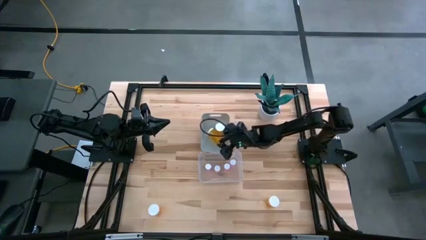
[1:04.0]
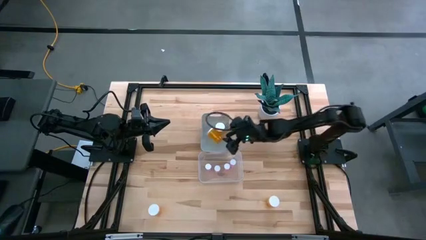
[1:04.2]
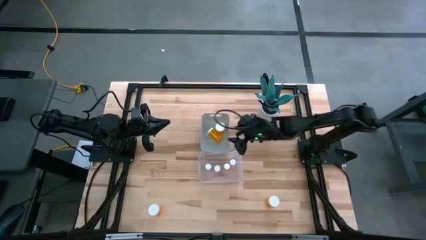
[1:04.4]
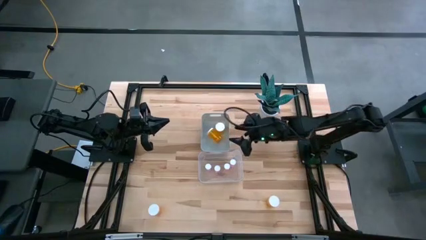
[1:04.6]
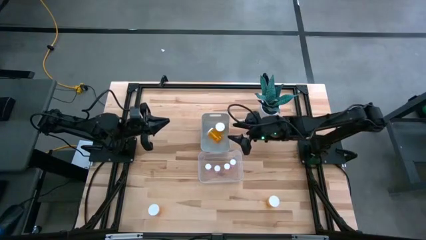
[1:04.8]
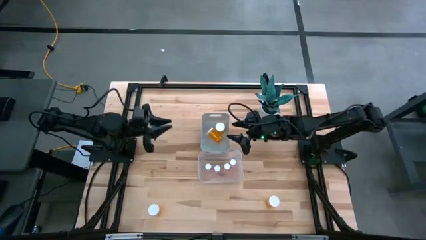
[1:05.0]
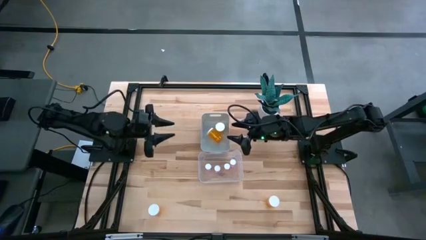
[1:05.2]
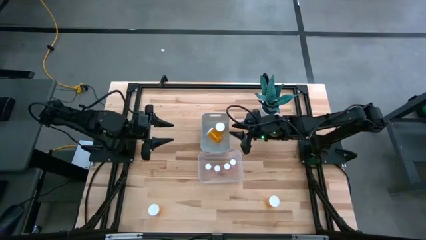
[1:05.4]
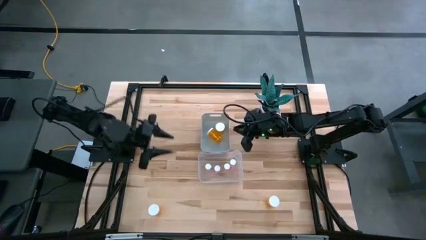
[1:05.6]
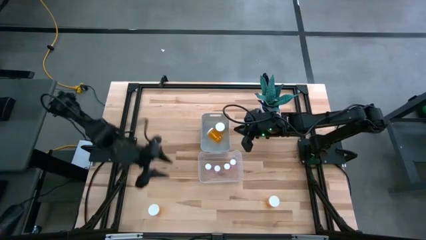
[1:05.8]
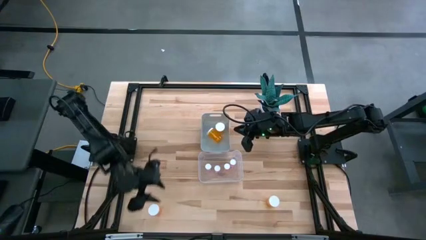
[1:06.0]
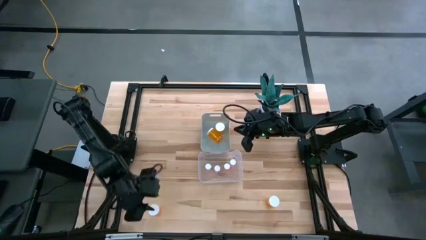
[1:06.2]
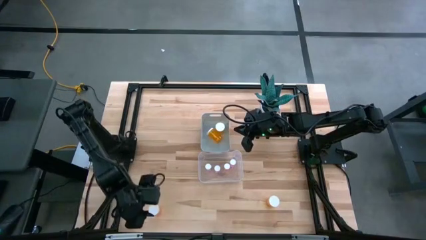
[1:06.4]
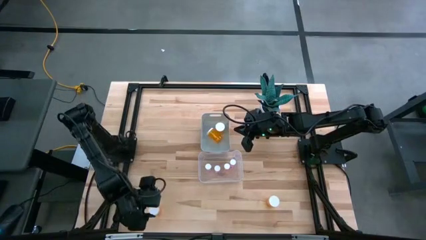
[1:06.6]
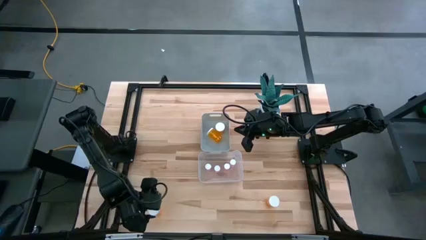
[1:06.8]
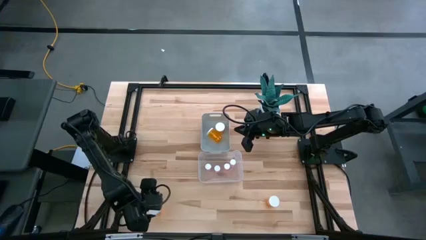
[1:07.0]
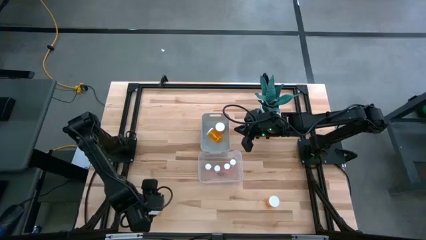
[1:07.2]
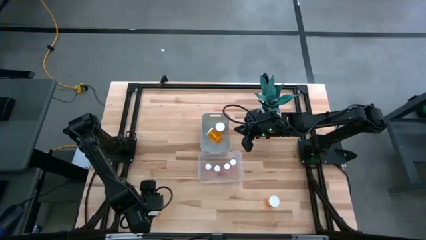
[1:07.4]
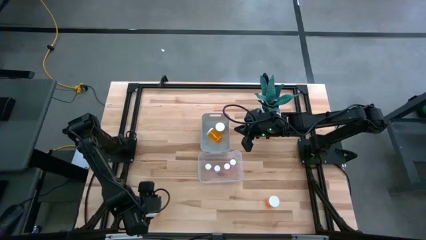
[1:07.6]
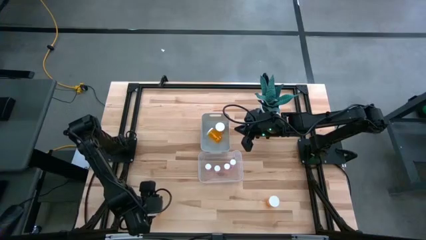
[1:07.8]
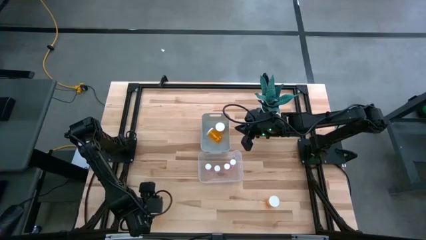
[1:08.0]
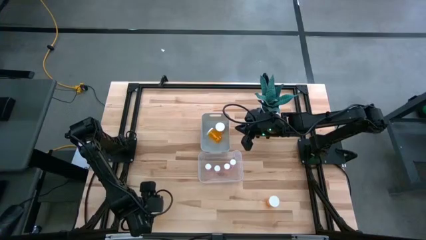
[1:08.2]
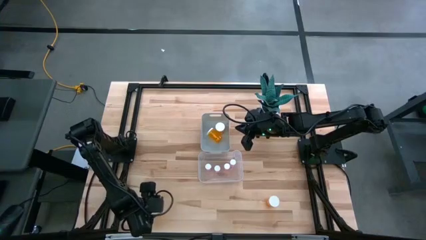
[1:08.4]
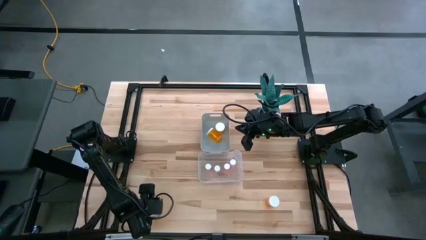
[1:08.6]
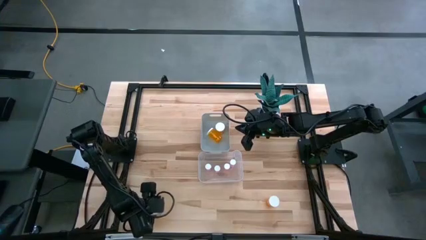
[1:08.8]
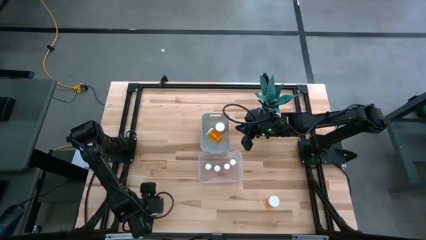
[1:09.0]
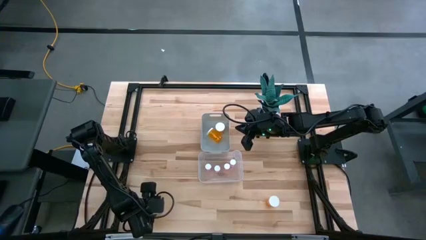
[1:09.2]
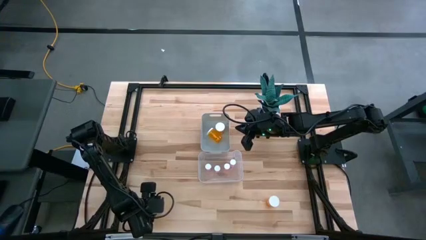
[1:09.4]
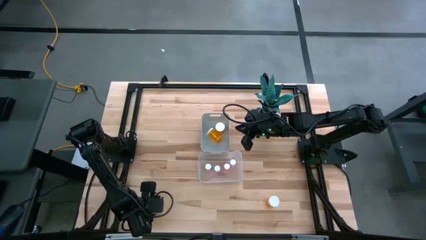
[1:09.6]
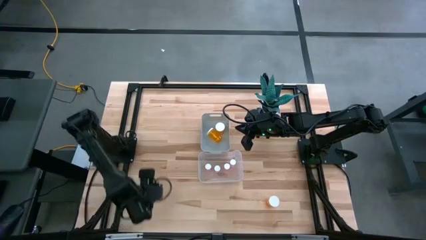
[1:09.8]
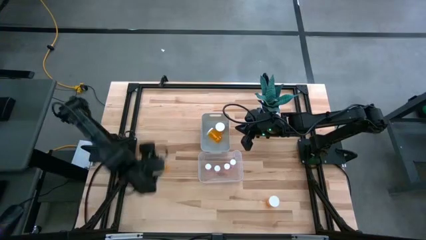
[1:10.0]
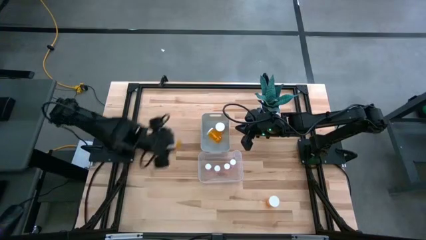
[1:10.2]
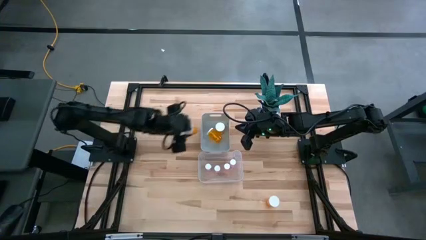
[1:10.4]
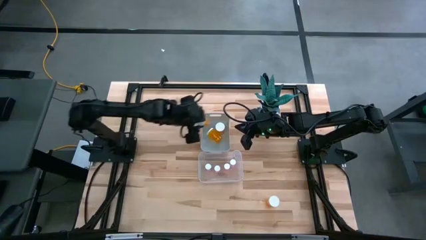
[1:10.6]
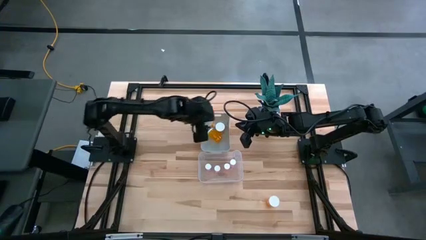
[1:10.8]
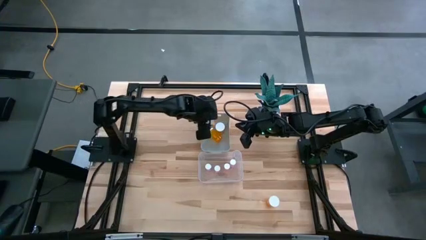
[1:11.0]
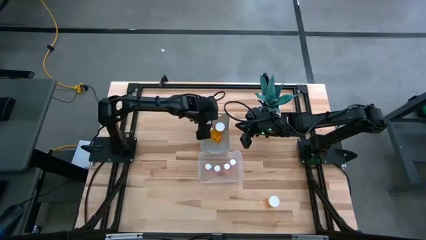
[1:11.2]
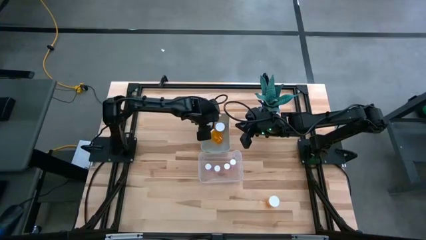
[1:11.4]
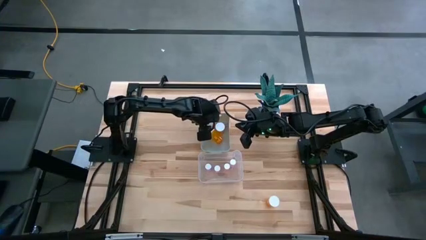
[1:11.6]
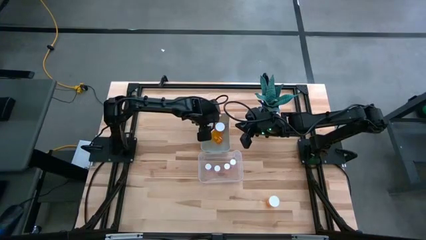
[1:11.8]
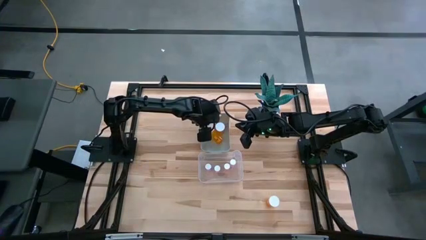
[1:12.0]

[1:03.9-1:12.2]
Task: Pick and place medicine bottles into bin by pill shape (circle, oval)
Put the left orange pill bottle into the gray bin

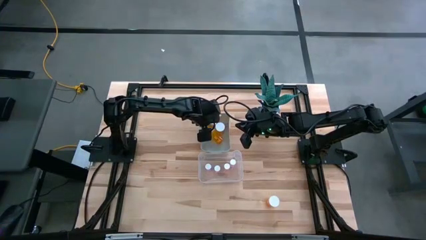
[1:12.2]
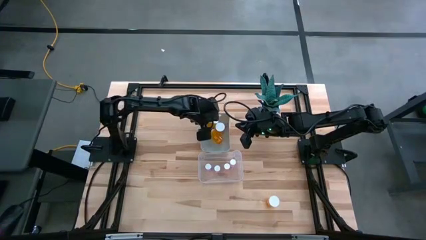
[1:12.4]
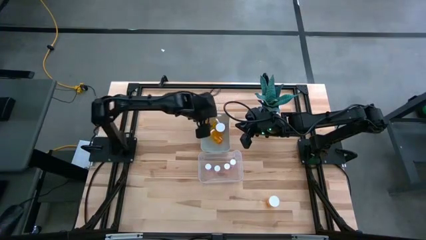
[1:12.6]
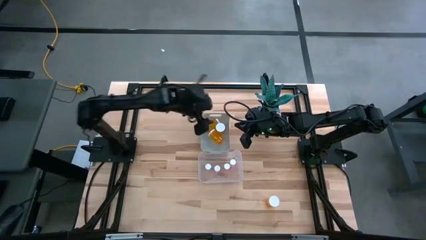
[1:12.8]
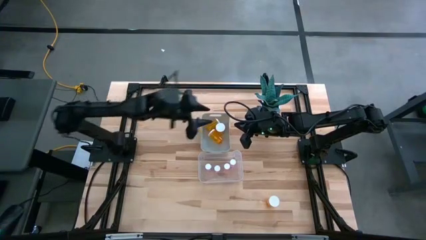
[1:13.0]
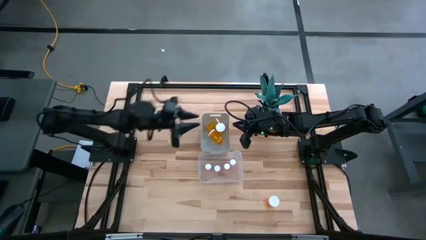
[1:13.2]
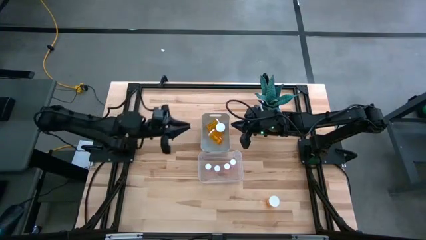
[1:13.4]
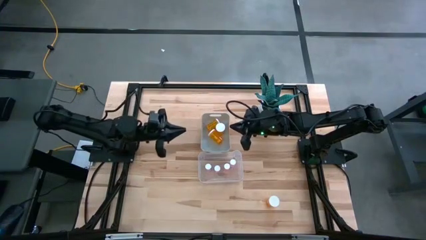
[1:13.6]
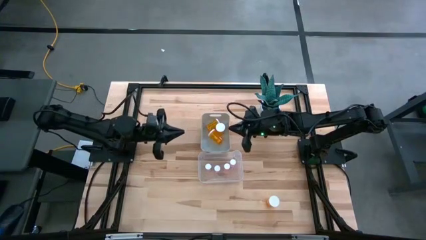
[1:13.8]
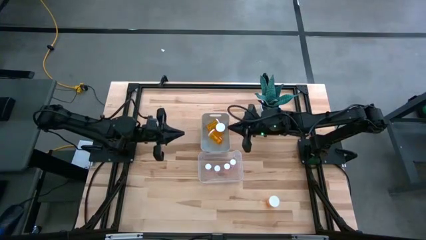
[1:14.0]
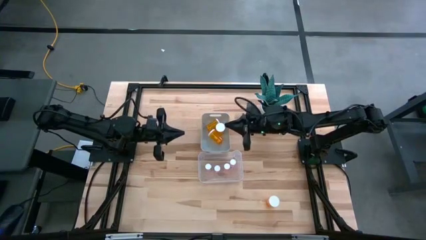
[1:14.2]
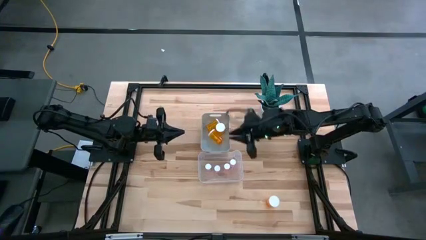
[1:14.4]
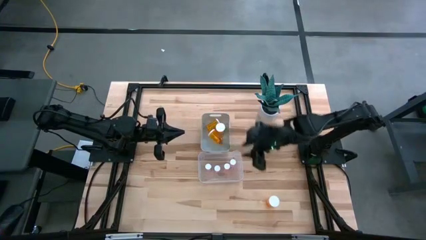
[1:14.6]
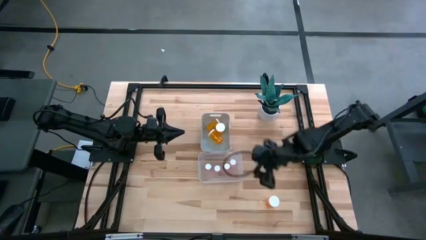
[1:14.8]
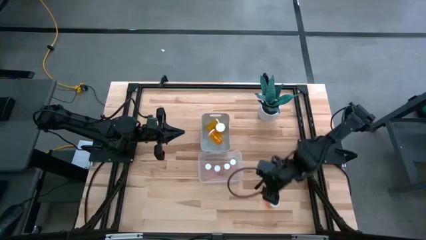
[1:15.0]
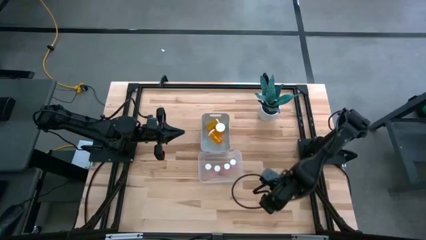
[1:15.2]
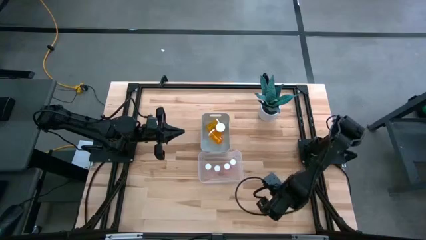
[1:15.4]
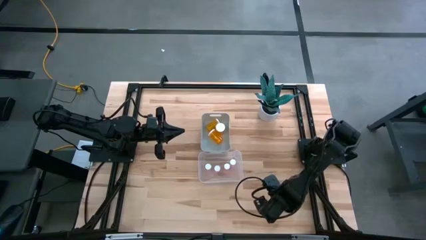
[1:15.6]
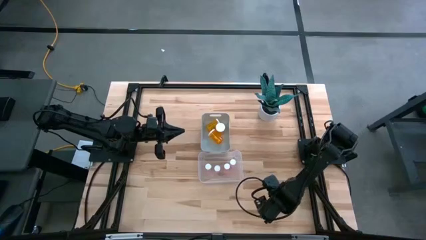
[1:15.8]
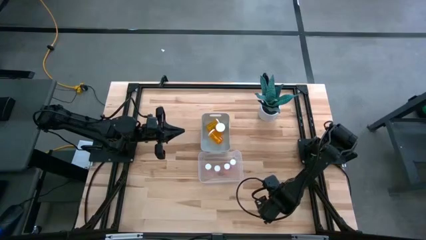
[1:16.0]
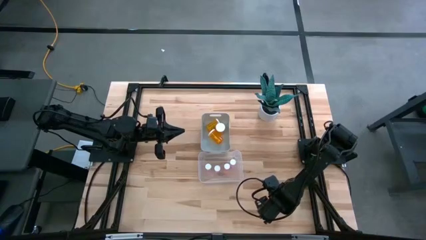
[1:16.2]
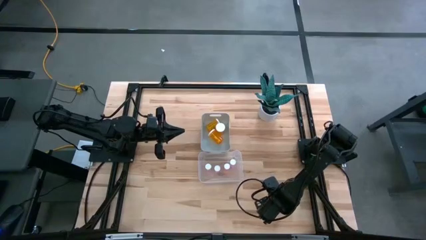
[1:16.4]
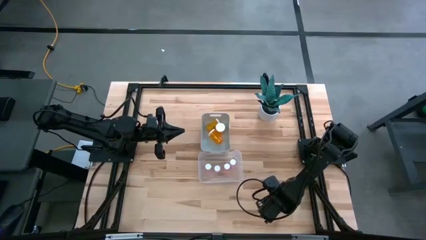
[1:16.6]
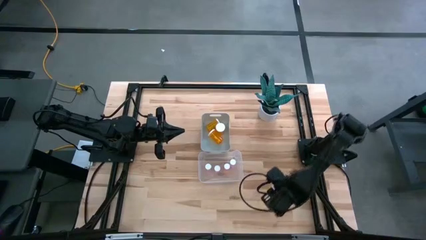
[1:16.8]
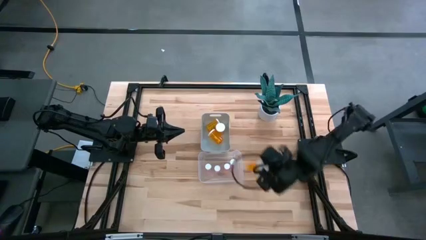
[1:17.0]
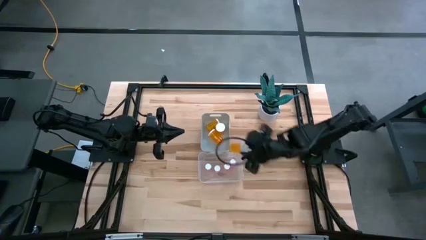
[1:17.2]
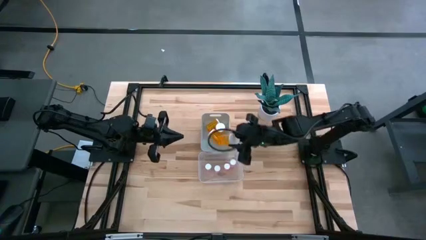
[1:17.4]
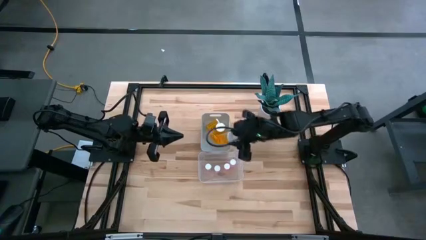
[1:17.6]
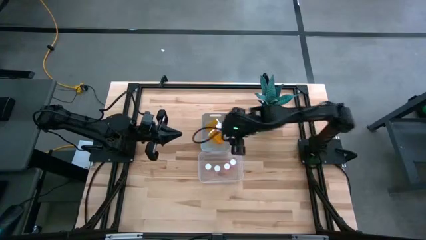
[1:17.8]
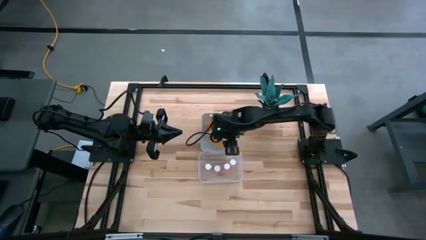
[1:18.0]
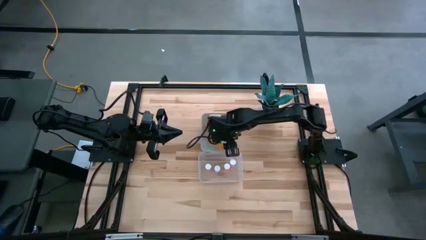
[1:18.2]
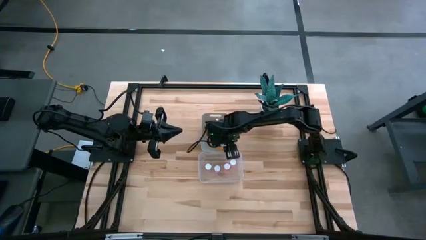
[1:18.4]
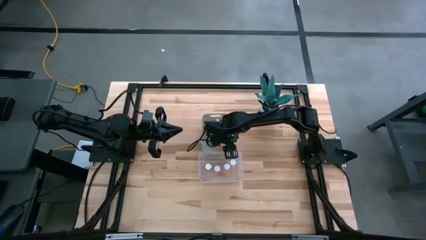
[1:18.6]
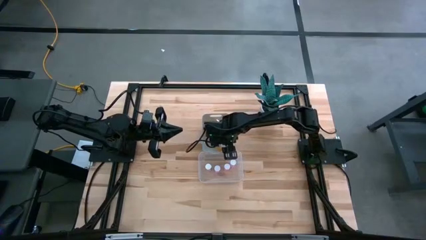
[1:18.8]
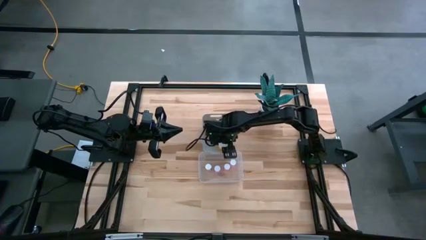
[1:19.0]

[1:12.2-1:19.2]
Put the orange pill bottle into the gray bin
